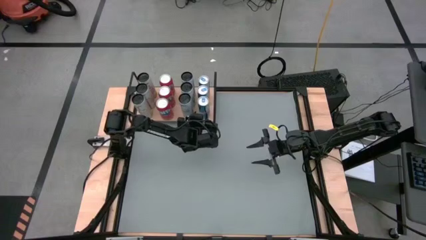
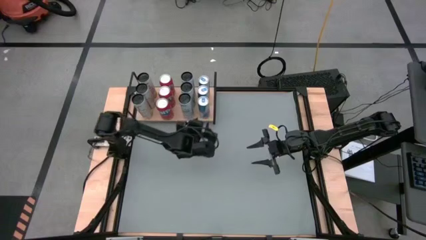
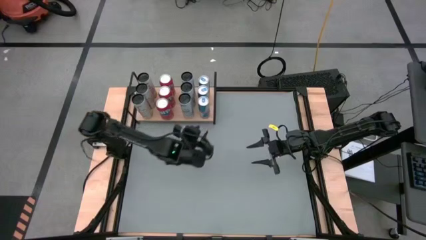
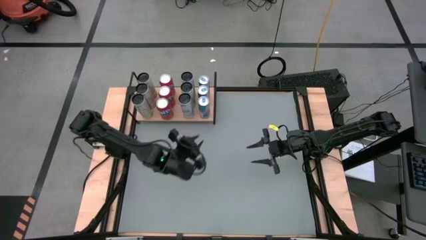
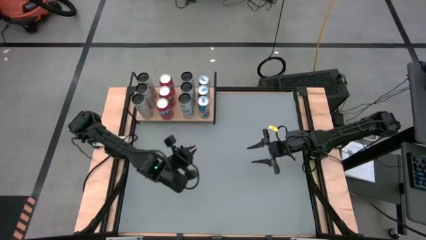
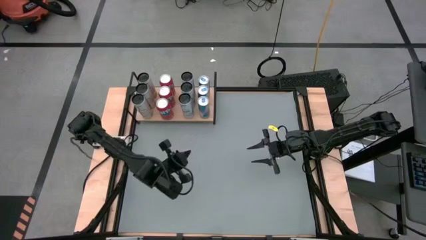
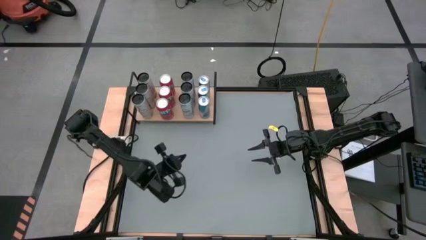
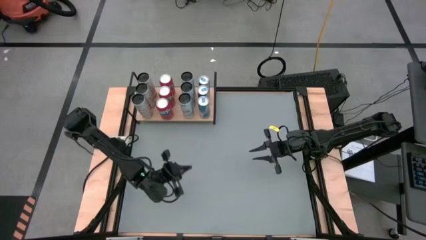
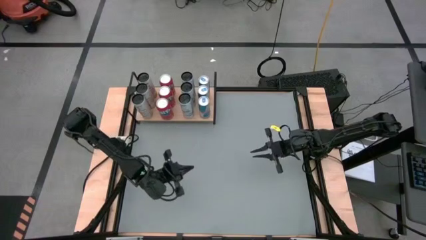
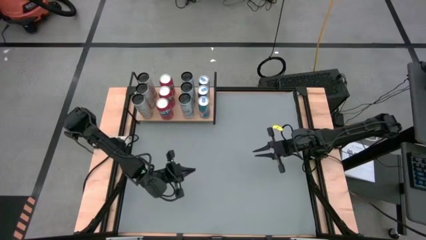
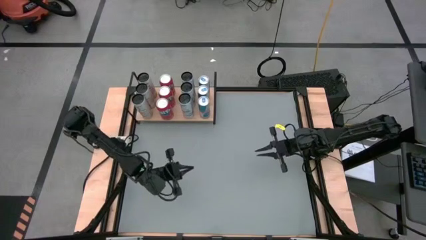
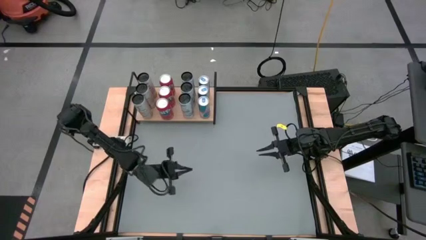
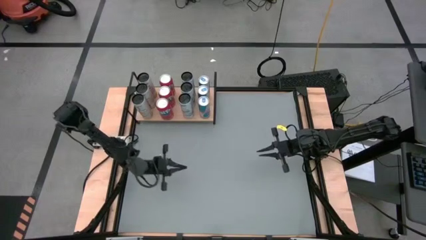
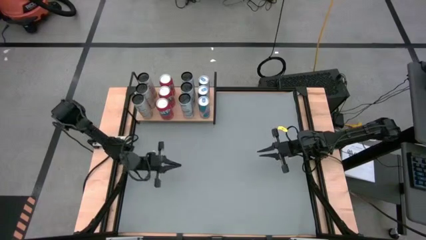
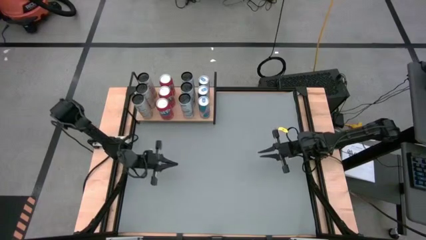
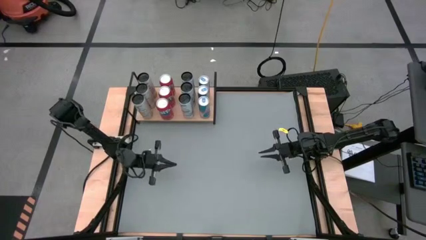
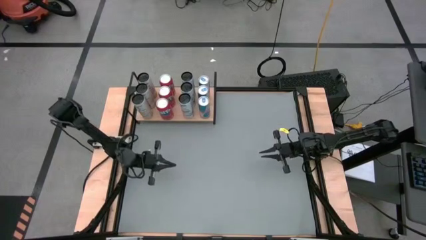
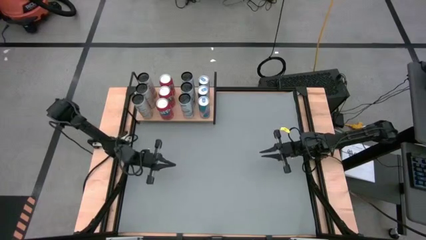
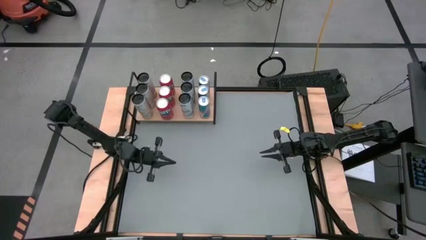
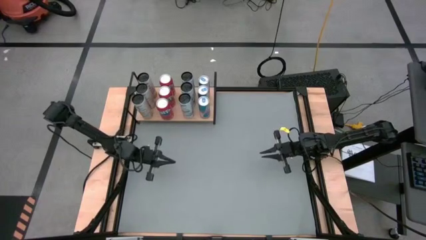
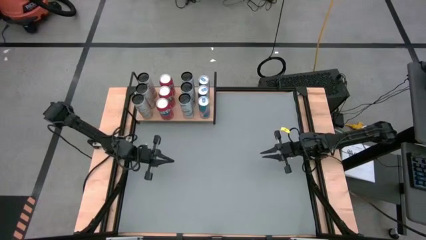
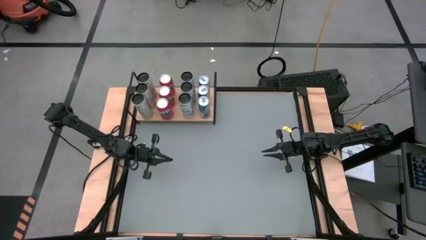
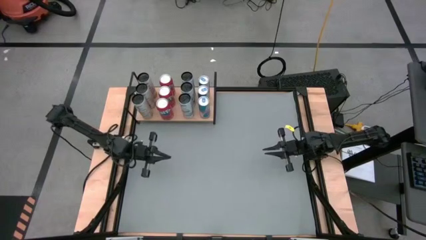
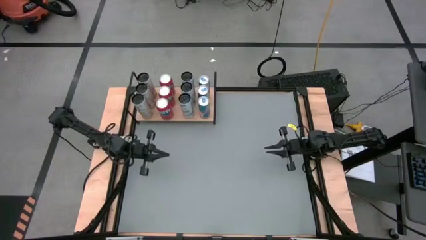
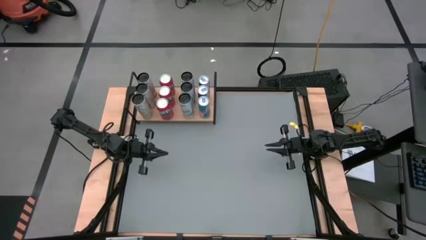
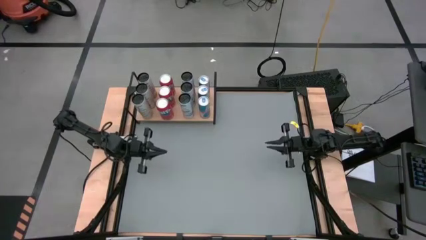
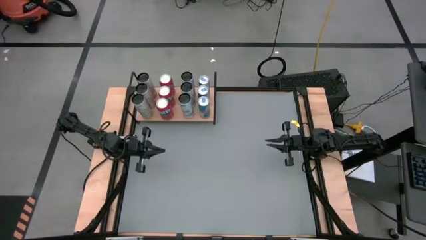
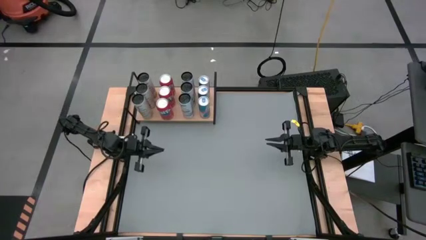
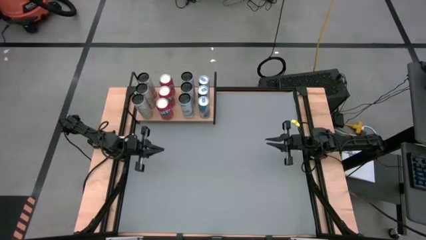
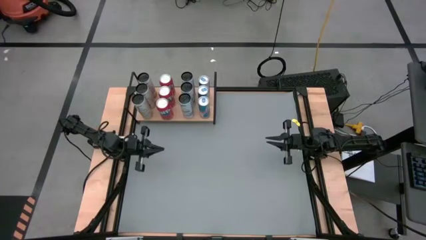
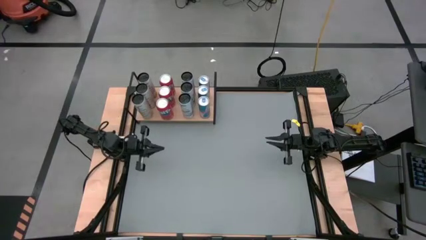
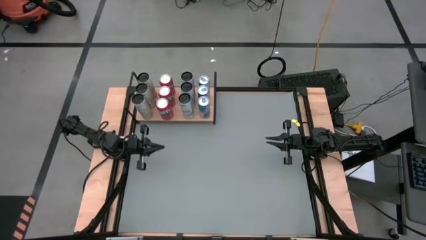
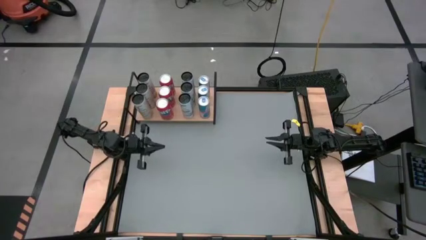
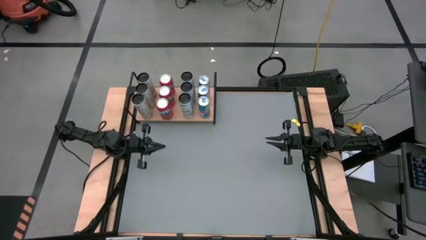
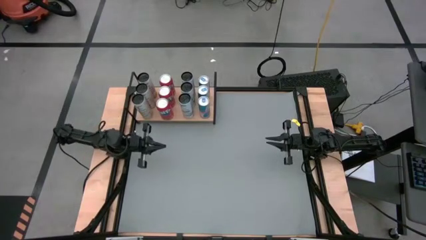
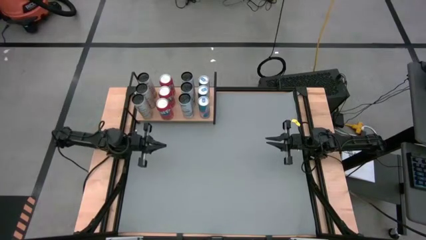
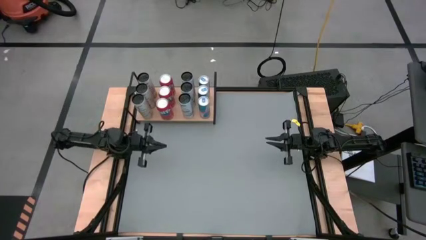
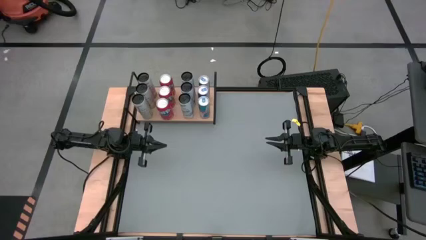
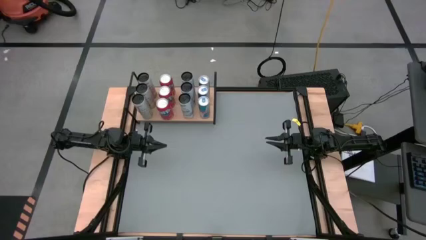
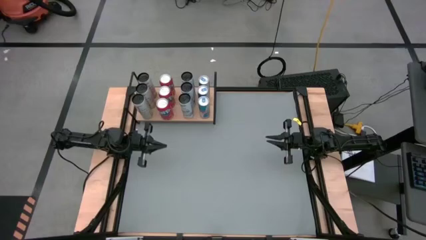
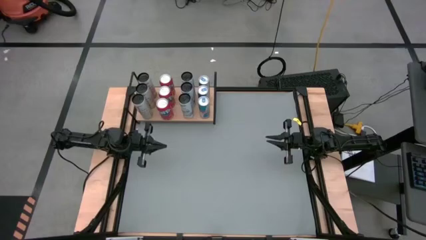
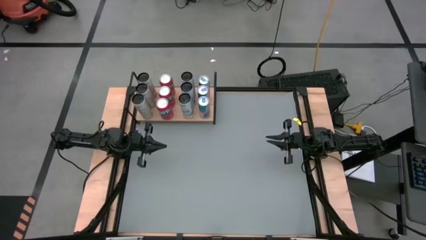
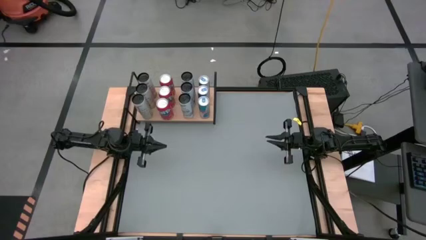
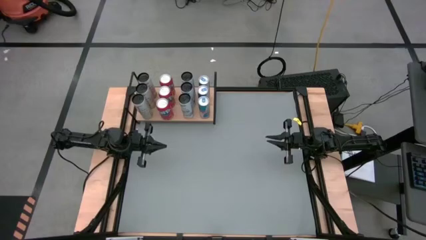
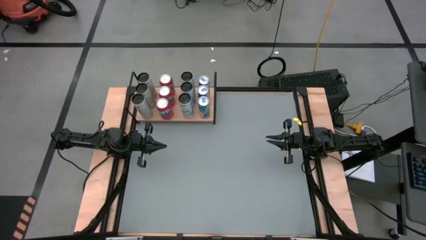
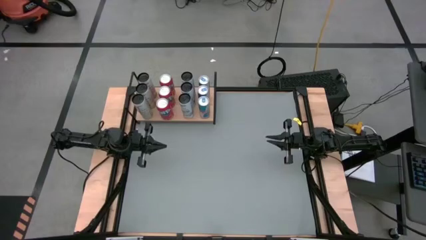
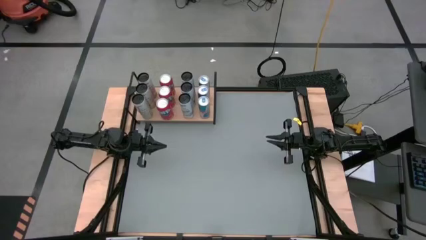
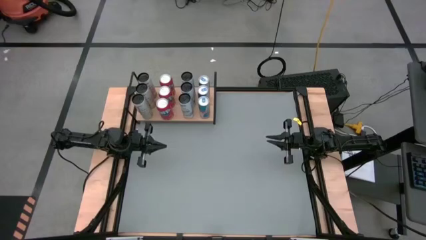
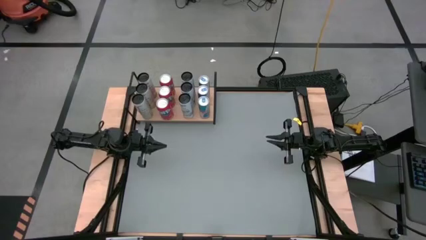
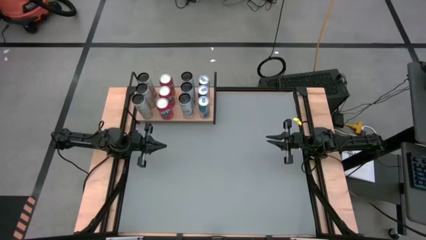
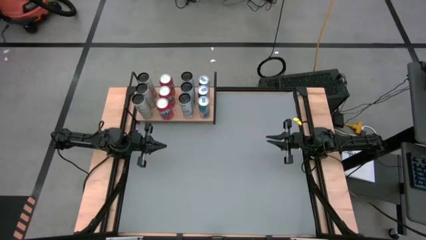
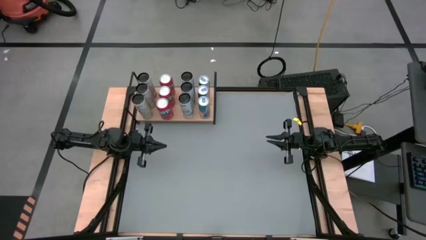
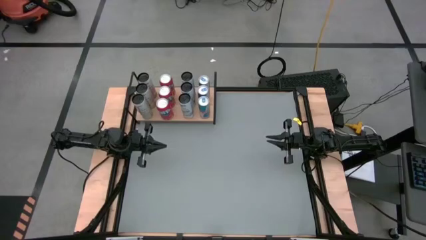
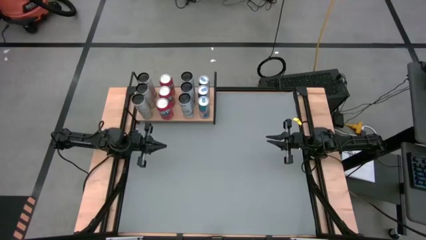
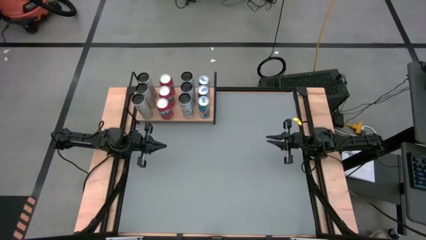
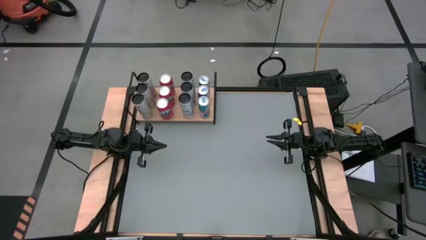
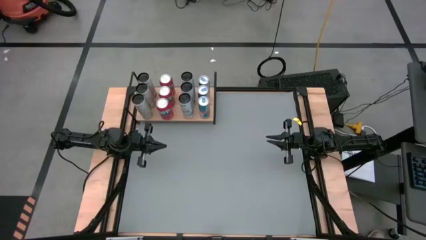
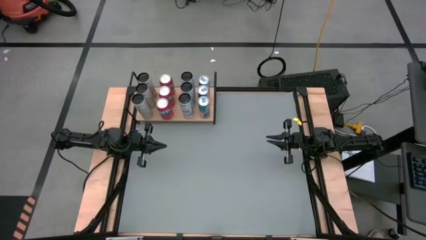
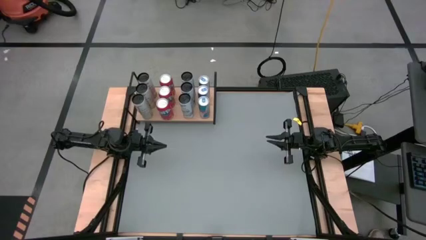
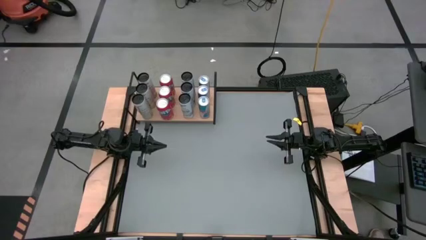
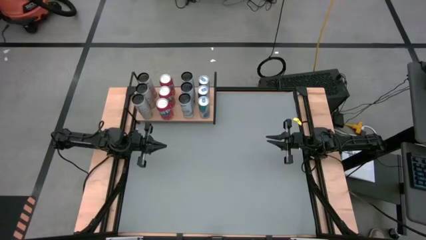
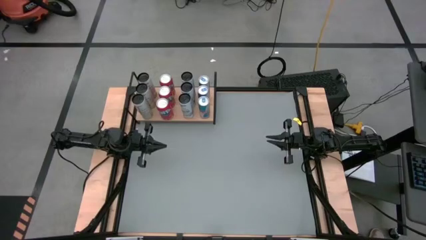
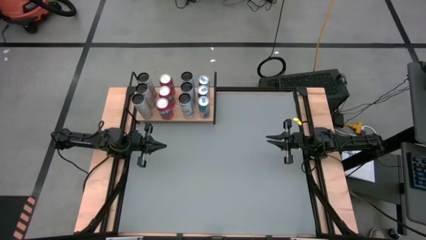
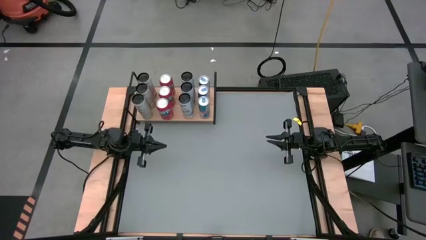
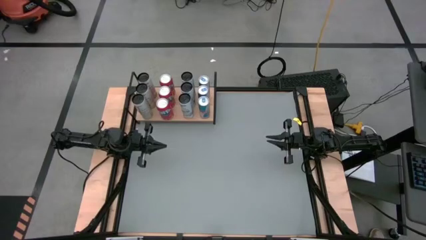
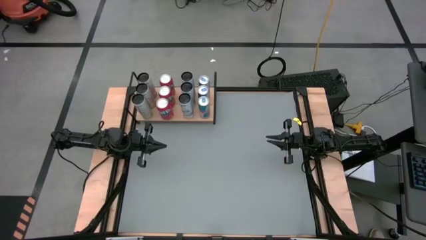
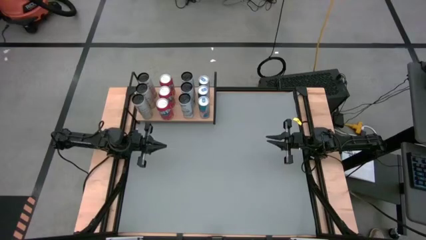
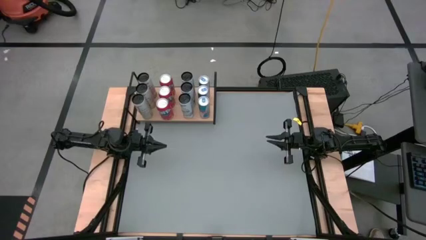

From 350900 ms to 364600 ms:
Task: Place canned beverage on shelf
Return to Home Position
